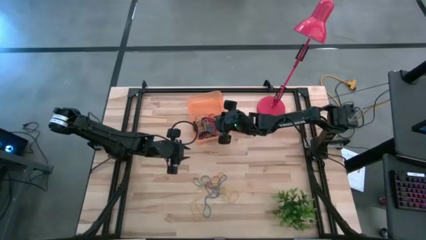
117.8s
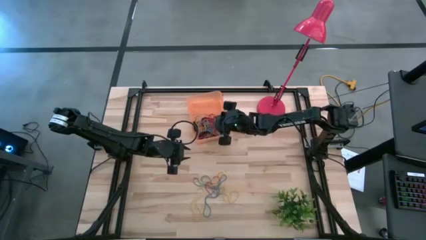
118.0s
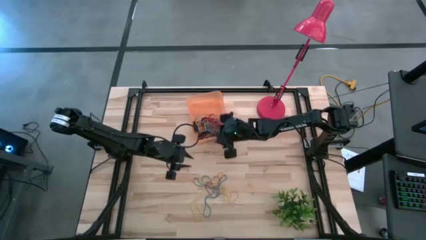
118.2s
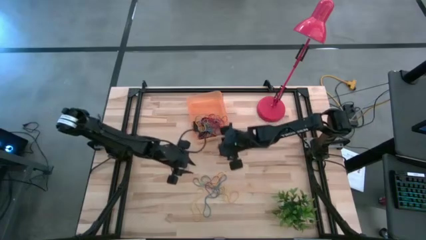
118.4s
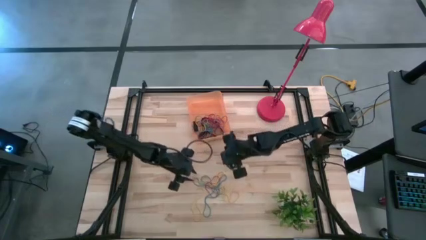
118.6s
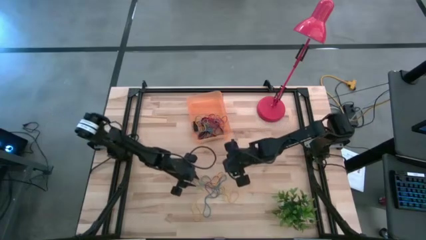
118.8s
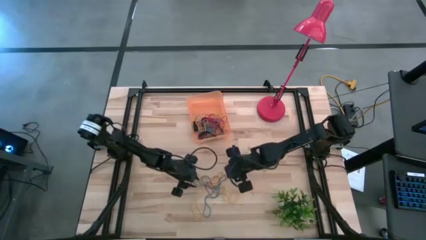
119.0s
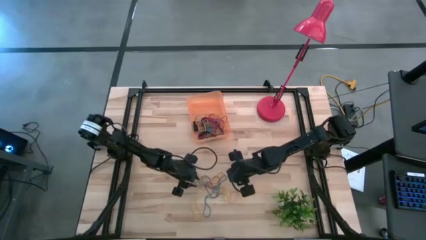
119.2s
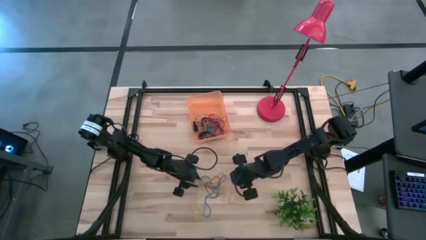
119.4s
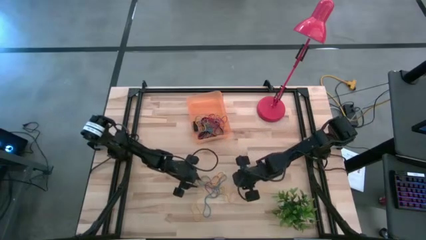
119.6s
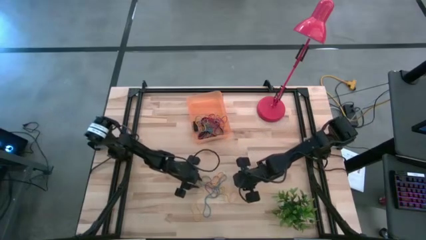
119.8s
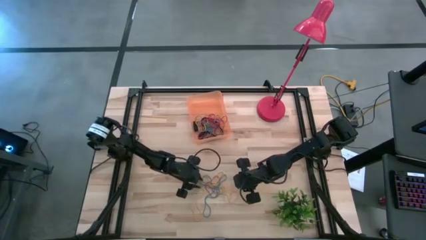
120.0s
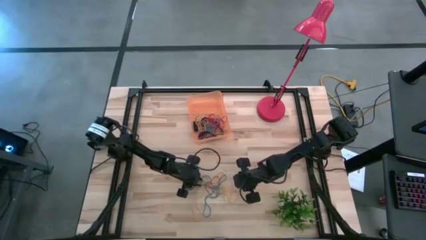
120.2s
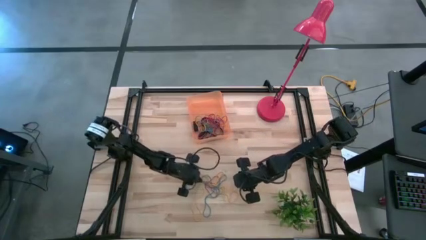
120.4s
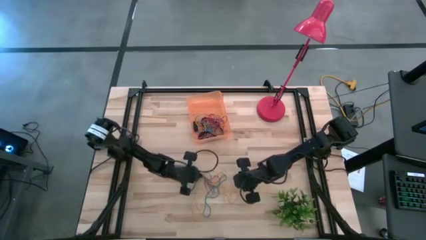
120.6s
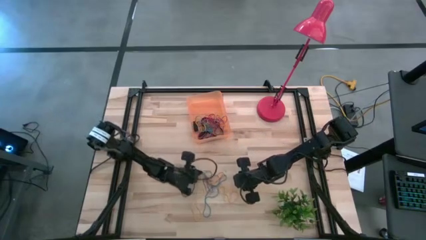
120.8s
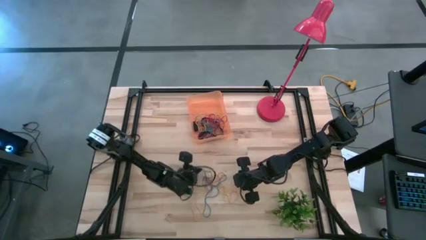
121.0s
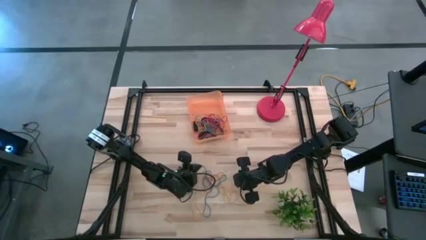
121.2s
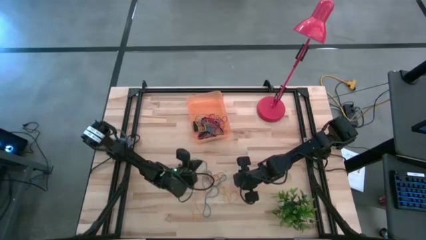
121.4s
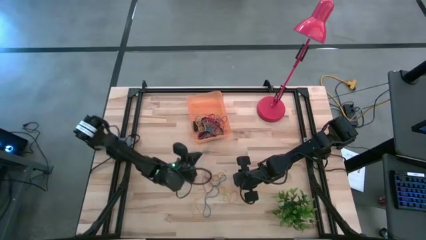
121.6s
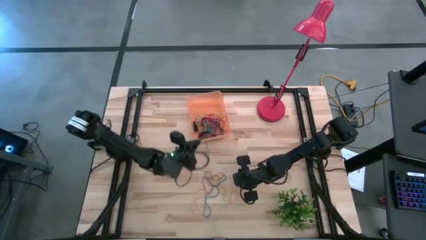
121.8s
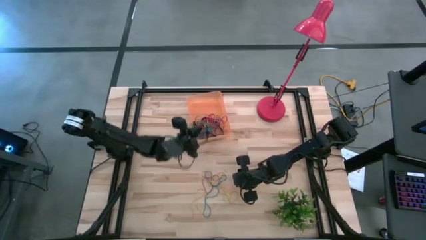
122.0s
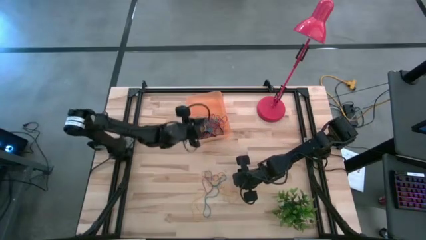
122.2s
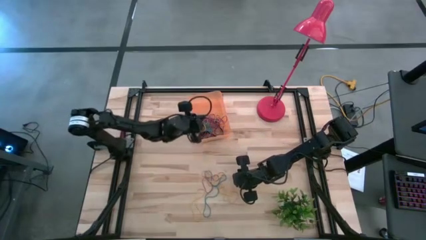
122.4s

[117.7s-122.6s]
Task: Pick and place rubber bands into bin
Put the blue rubber band into the orange bin

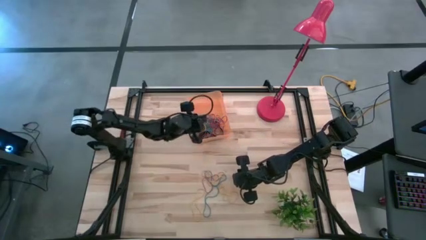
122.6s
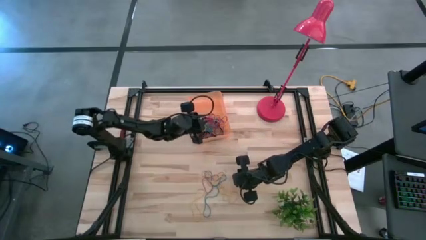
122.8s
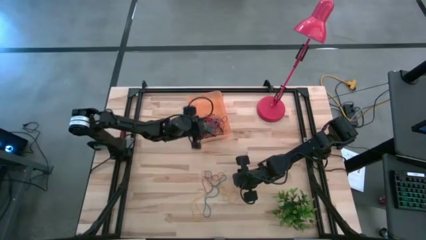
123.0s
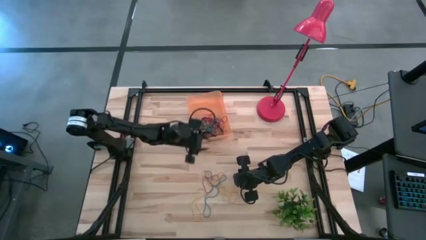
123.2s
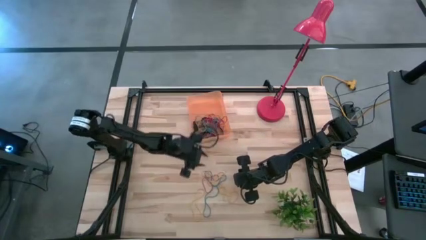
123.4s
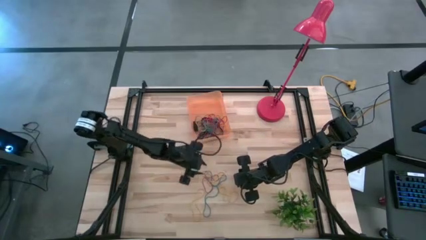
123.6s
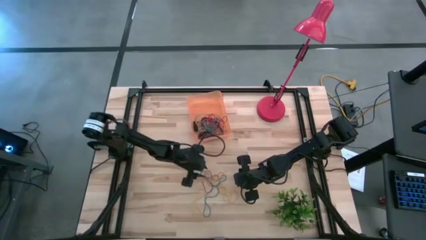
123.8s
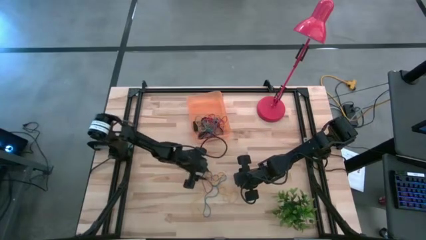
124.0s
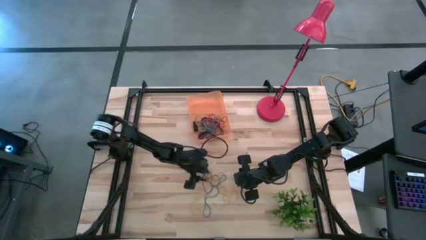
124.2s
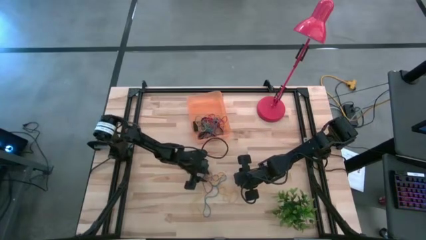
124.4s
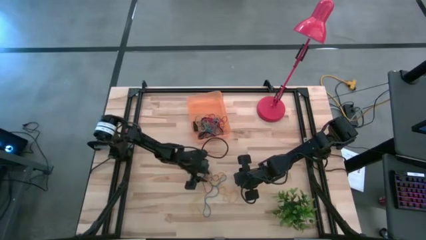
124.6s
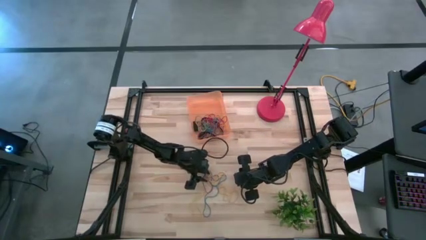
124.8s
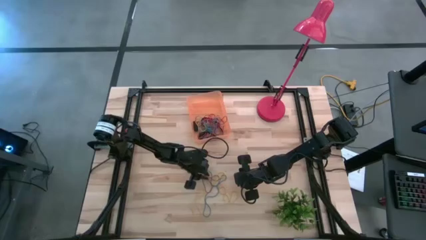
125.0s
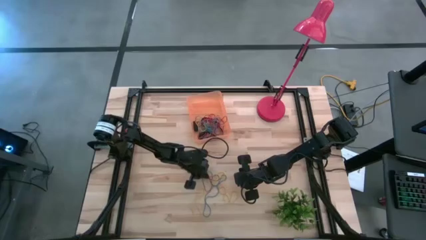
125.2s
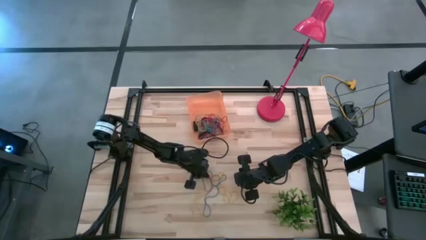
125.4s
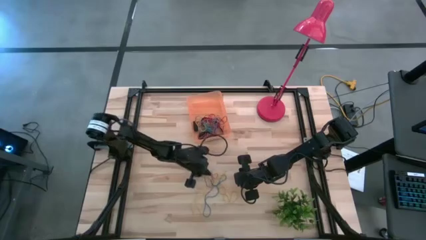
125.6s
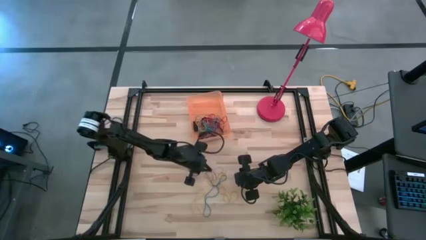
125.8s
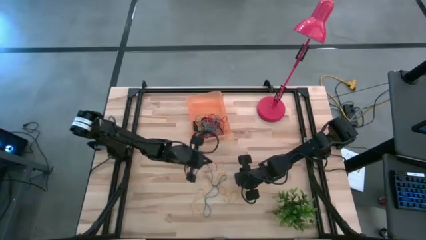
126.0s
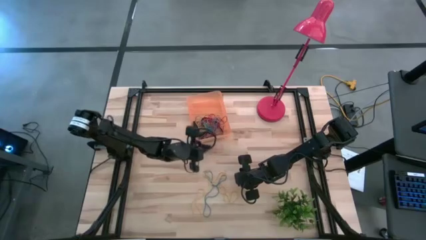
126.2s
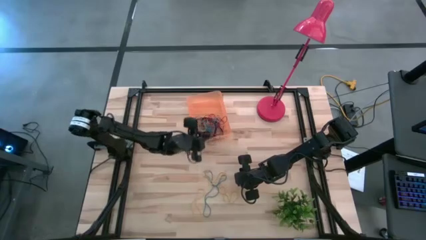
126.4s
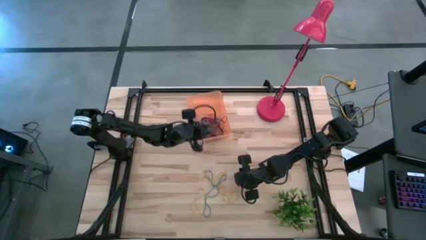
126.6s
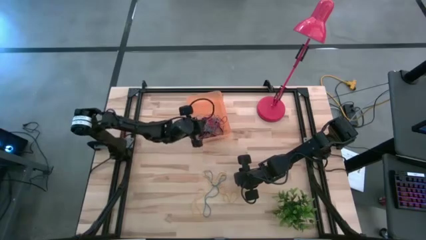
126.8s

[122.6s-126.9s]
Put the red rubber band into the orange bin

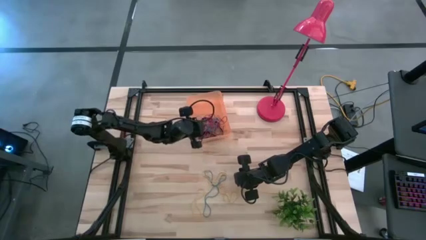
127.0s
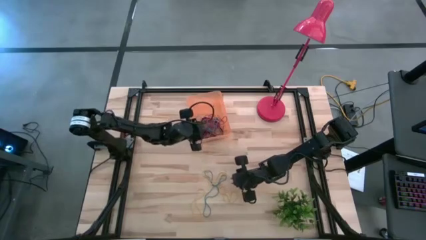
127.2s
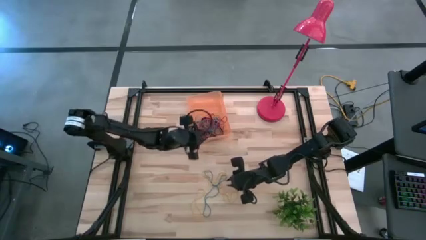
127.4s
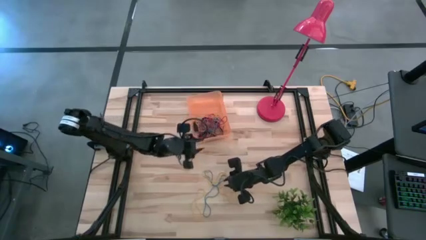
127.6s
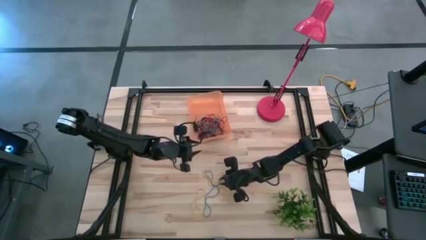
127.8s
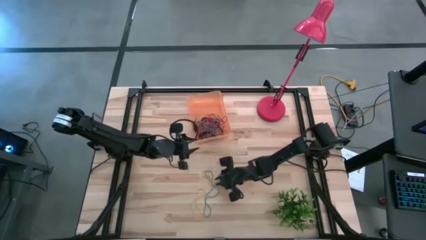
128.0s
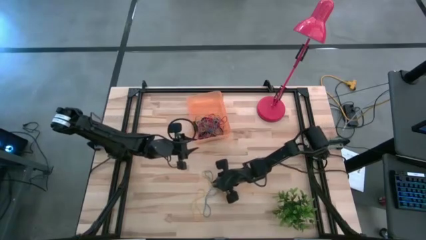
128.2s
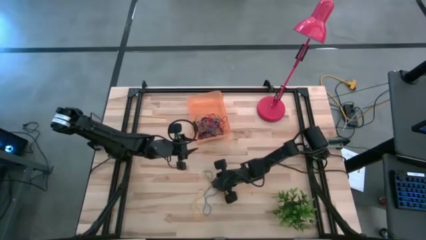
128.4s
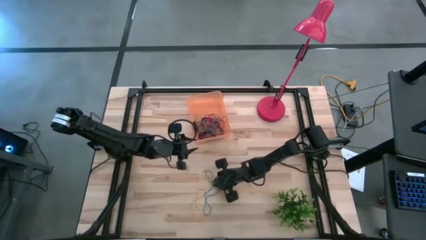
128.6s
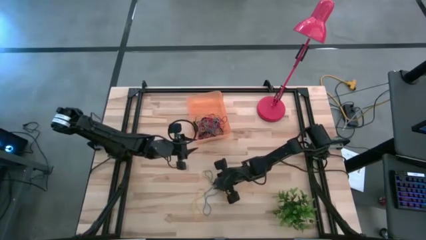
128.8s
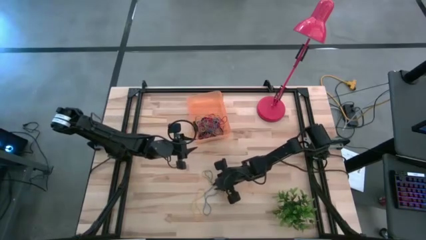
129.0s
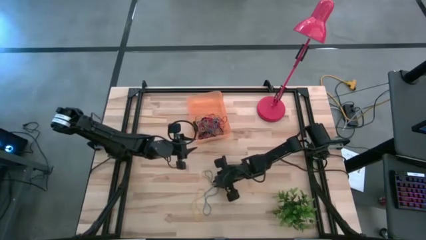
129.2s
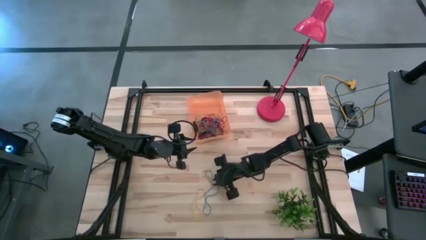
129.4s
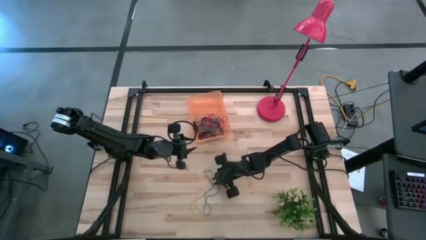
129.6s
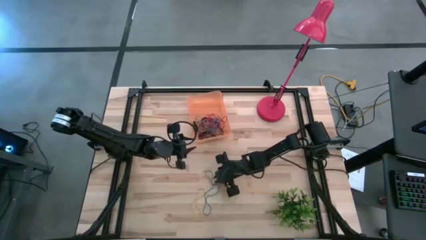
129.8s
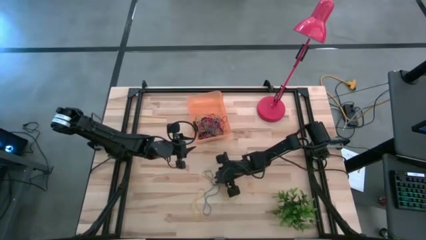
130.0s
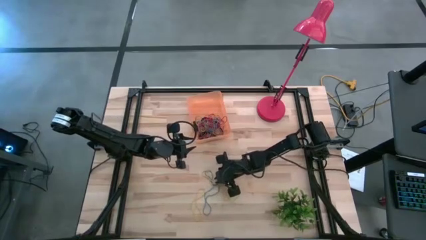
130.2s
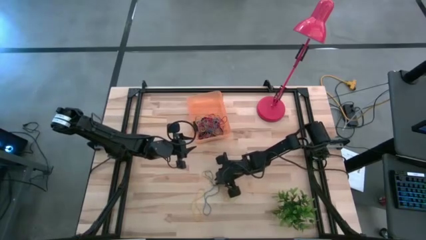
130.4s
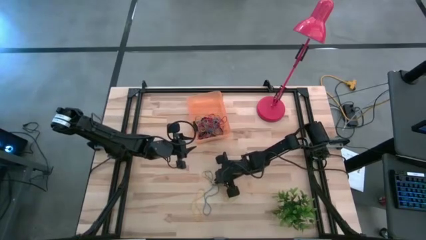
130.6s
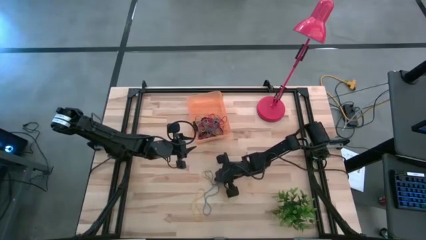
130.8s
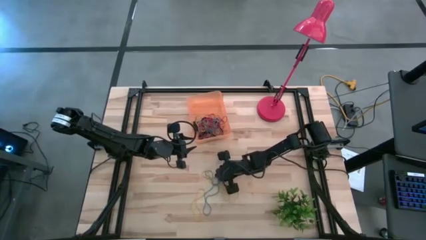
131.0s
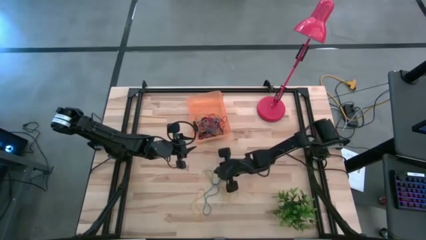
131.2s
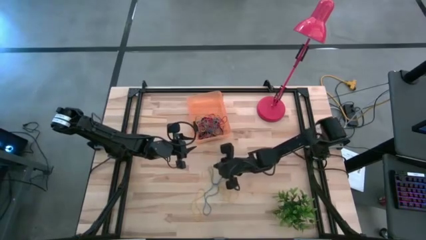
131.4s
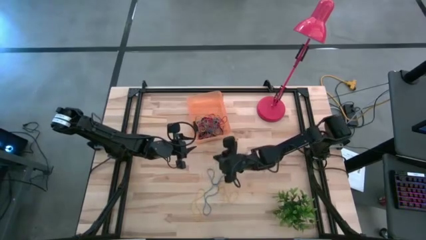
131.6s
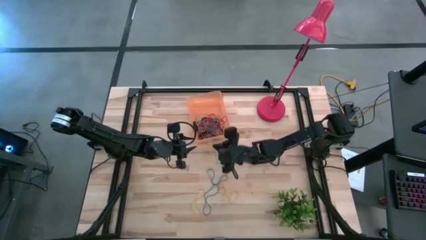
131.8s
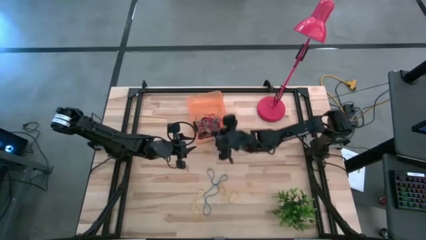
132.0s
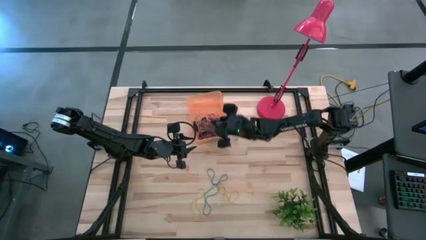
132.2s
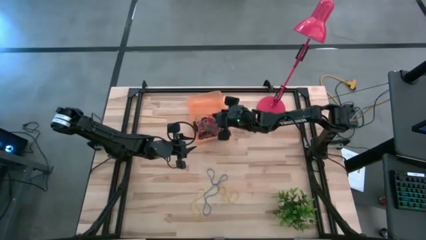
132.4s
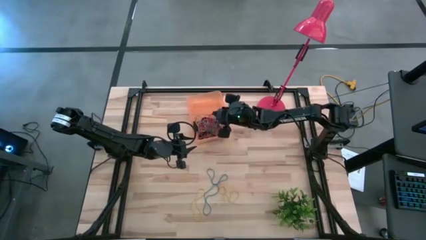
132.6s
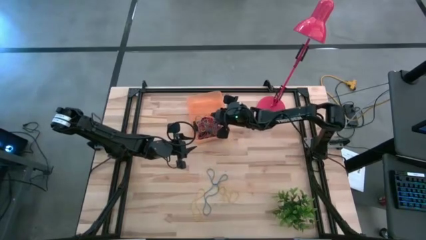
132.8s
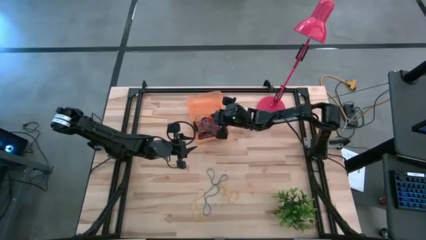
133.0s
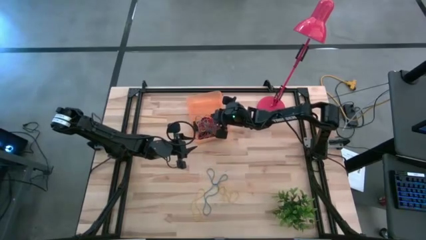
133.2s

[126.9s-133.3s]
Put the yellow rubber band into the orange bin

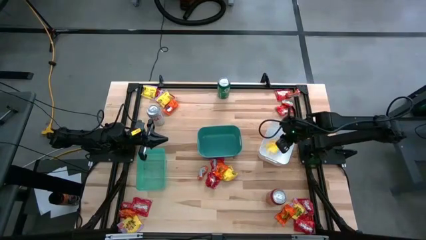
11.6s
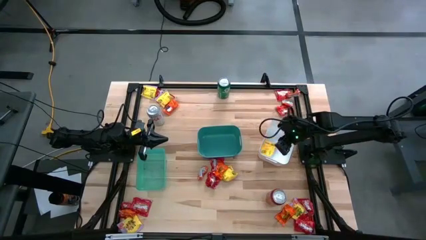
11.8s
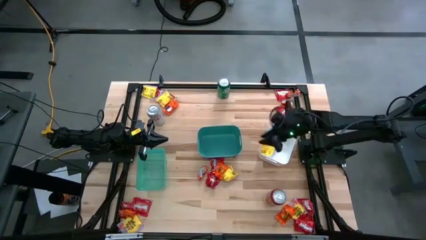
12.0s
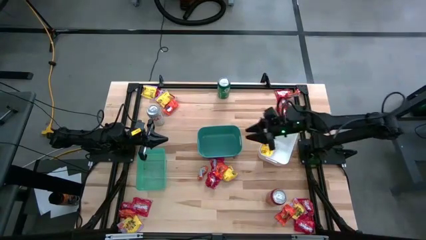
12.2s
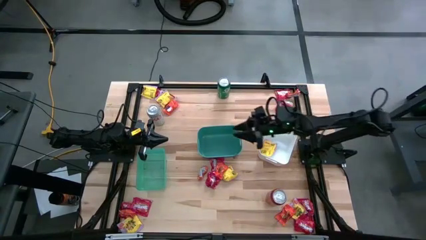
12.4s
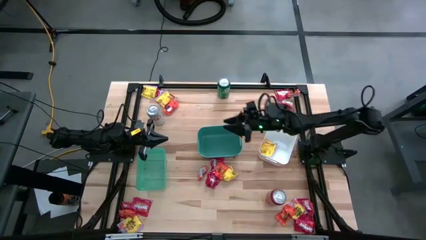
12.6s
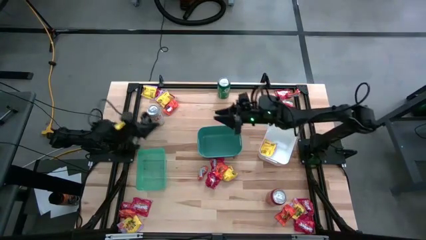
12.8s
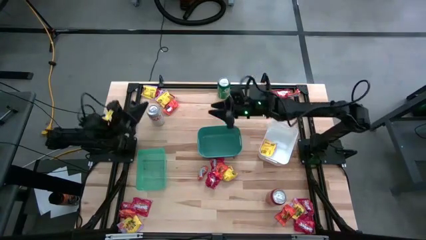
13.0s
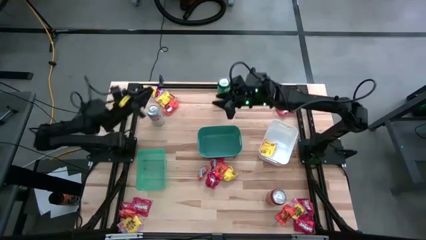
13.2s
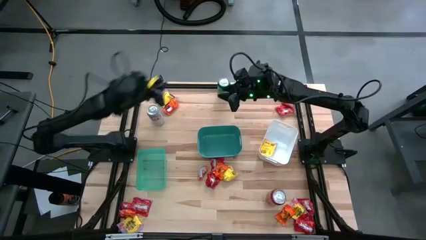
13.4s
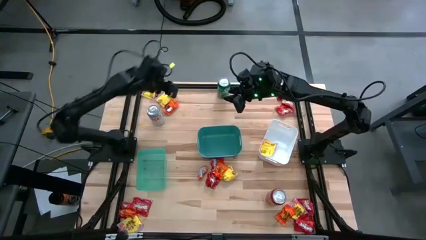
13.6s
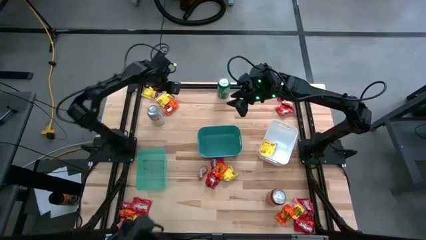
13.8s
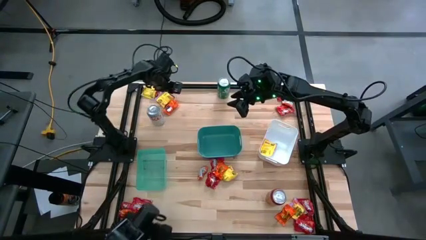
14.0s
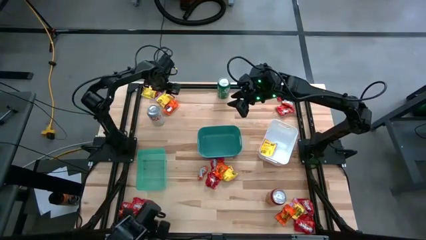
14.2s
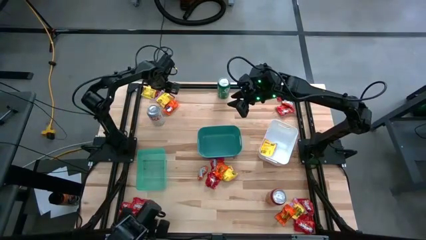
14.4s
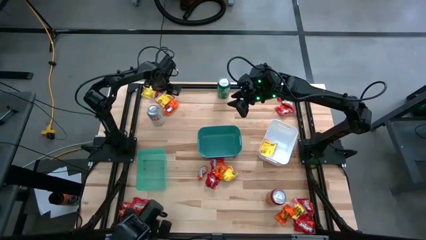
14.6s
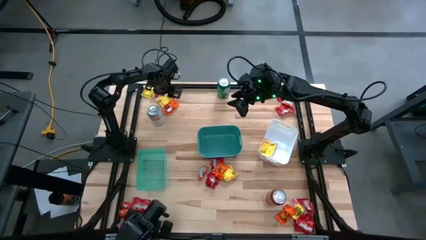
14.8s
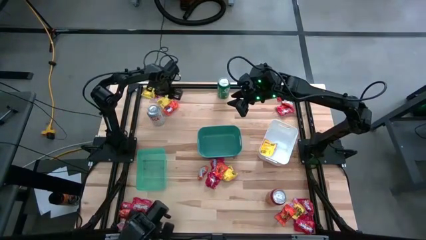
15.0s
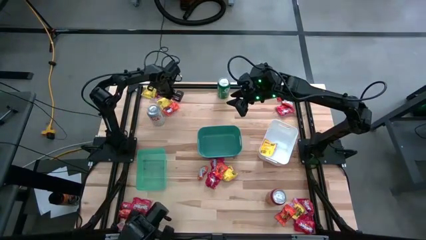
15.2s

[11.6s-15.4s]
Task: Sort candy
Put the yellow candy into the white bin
